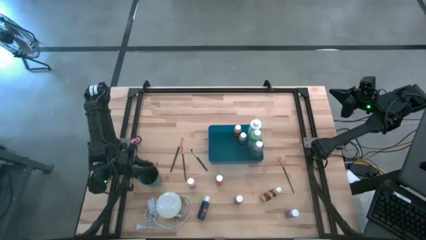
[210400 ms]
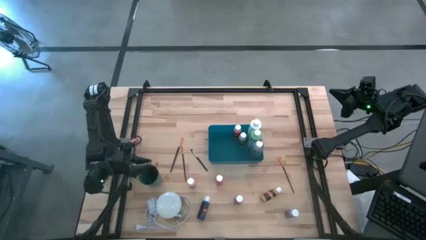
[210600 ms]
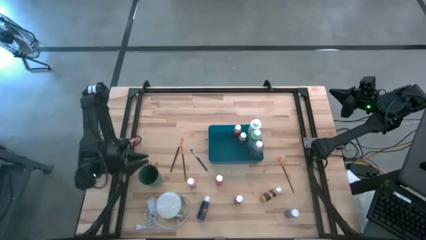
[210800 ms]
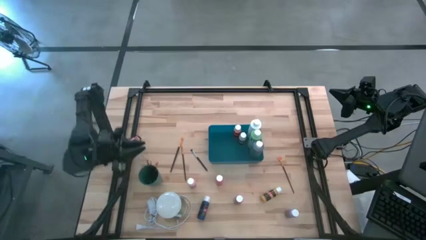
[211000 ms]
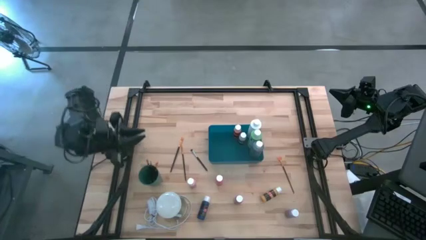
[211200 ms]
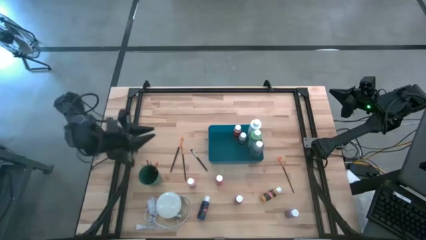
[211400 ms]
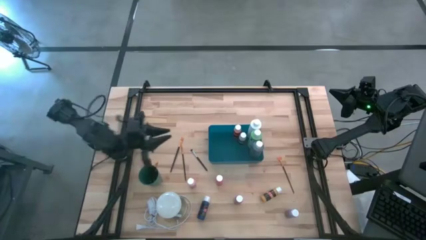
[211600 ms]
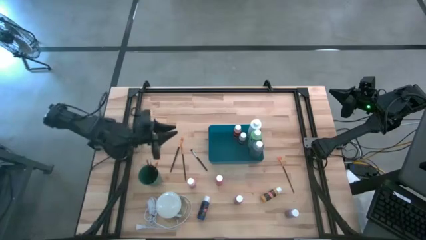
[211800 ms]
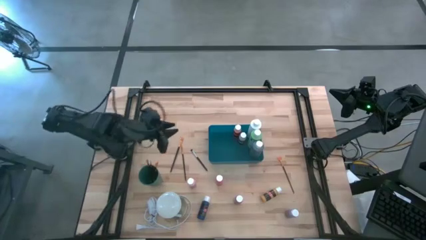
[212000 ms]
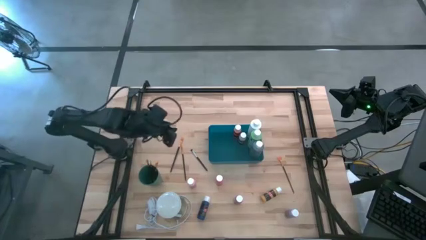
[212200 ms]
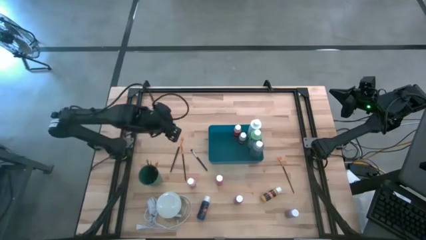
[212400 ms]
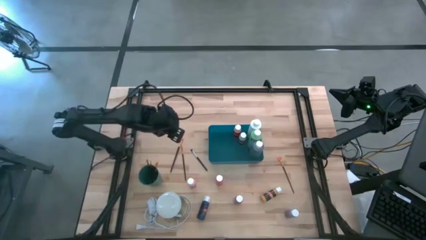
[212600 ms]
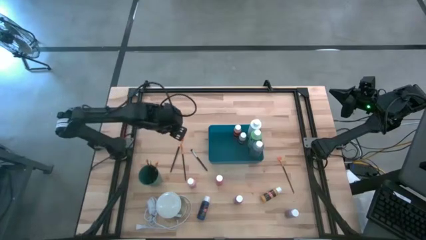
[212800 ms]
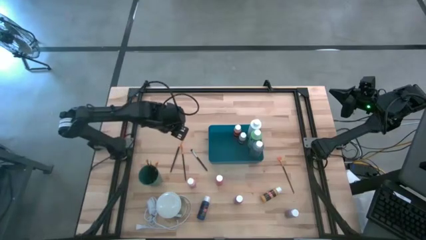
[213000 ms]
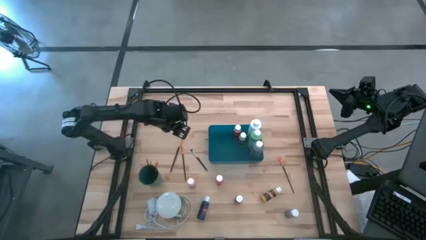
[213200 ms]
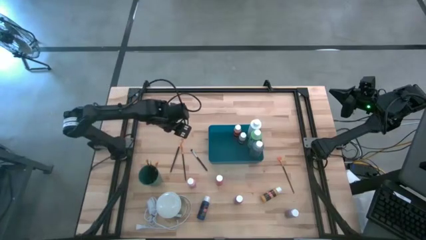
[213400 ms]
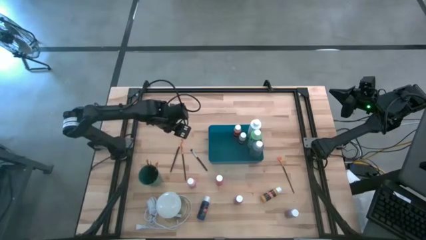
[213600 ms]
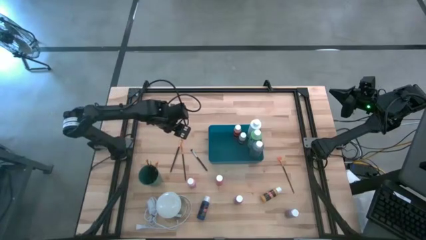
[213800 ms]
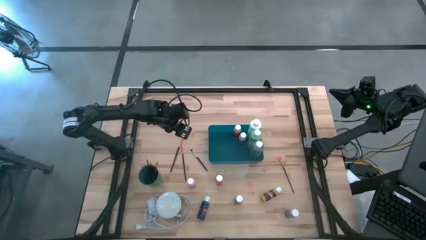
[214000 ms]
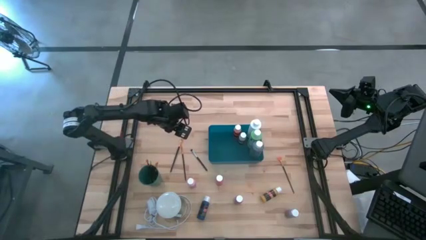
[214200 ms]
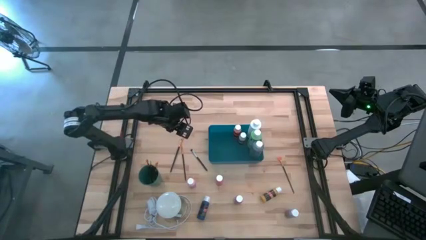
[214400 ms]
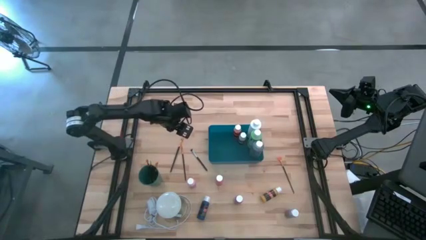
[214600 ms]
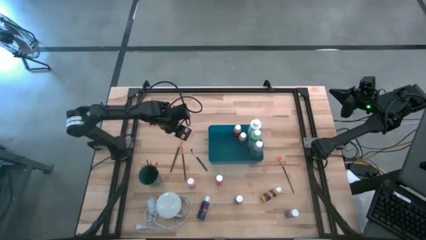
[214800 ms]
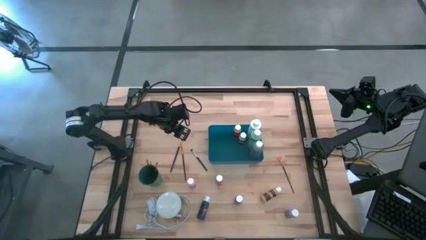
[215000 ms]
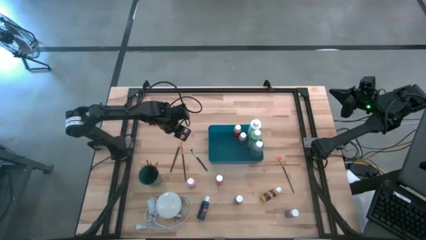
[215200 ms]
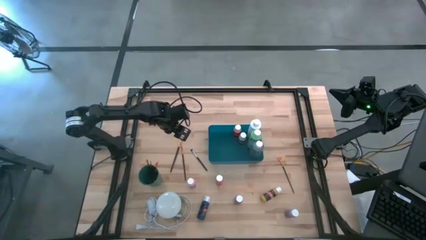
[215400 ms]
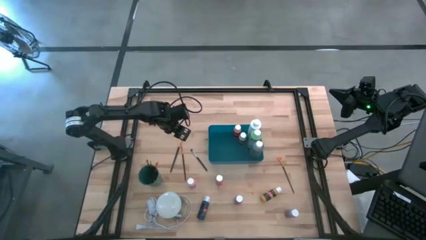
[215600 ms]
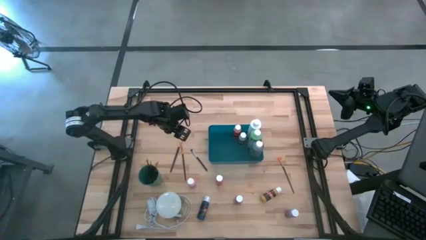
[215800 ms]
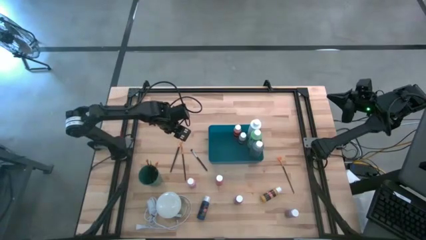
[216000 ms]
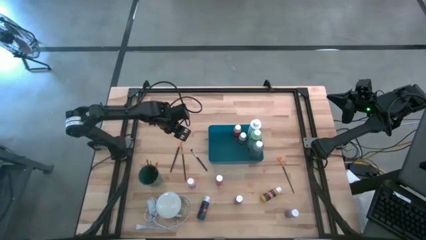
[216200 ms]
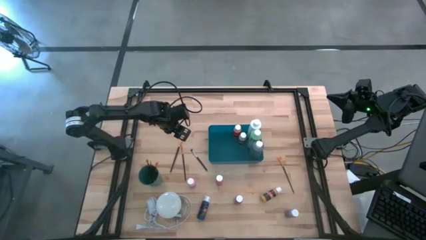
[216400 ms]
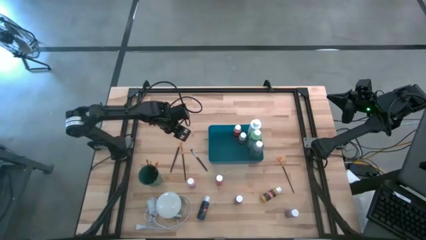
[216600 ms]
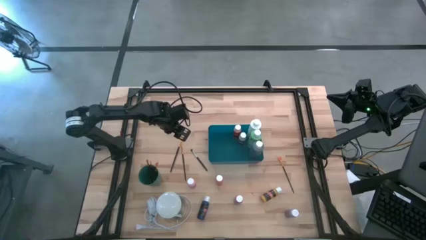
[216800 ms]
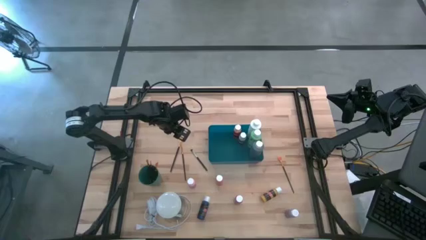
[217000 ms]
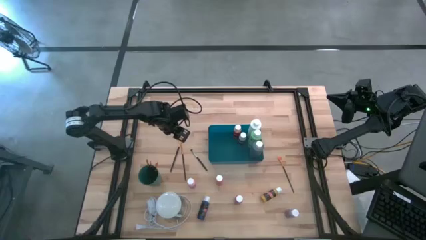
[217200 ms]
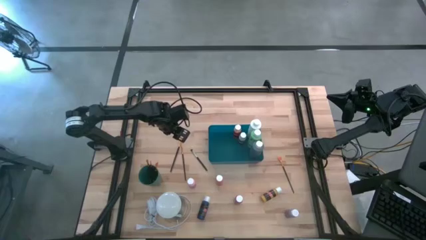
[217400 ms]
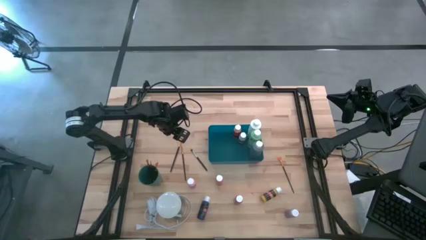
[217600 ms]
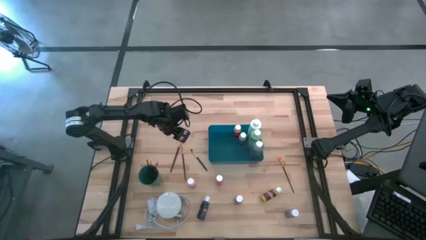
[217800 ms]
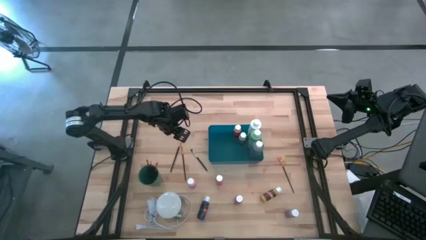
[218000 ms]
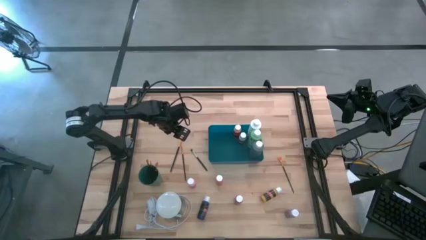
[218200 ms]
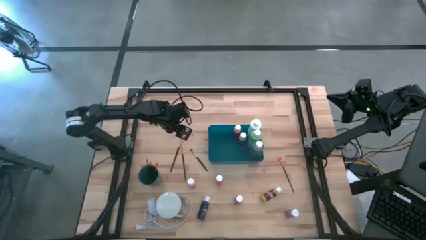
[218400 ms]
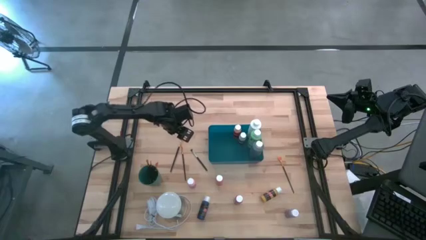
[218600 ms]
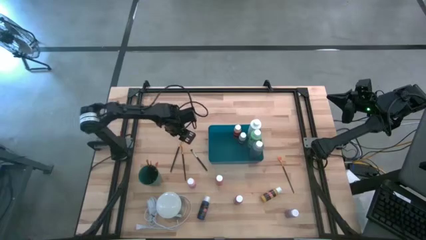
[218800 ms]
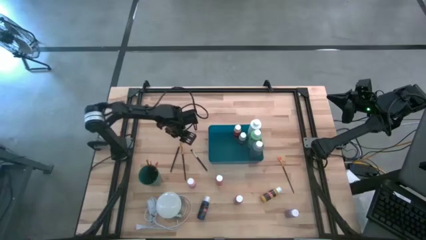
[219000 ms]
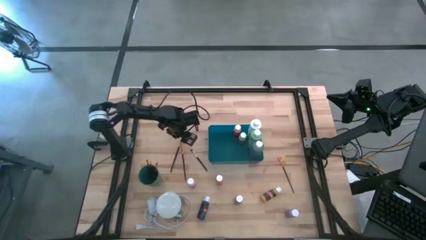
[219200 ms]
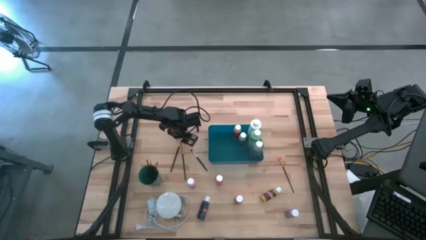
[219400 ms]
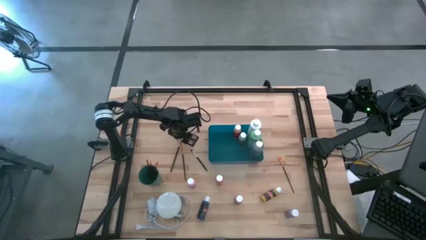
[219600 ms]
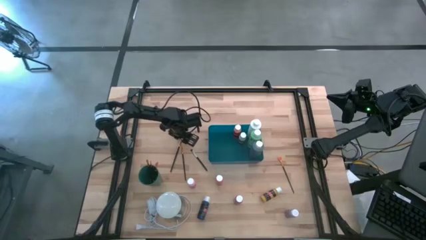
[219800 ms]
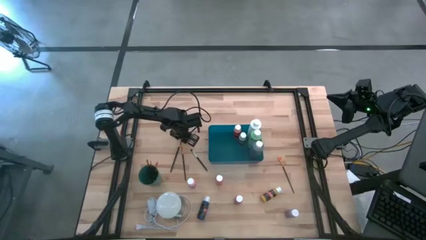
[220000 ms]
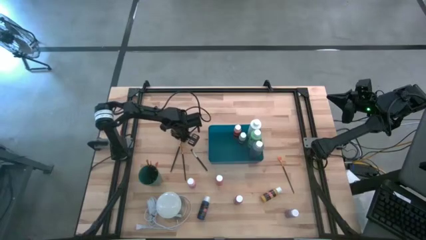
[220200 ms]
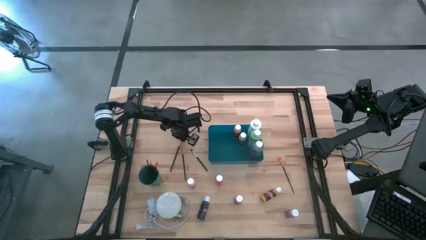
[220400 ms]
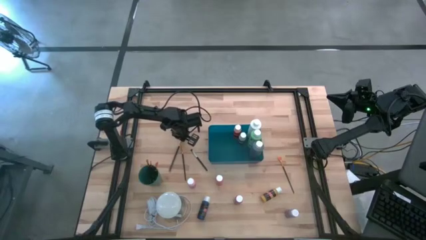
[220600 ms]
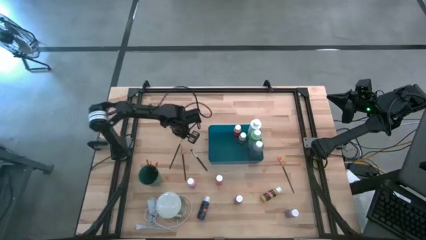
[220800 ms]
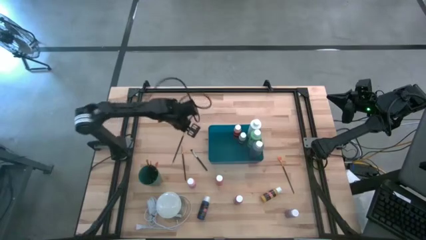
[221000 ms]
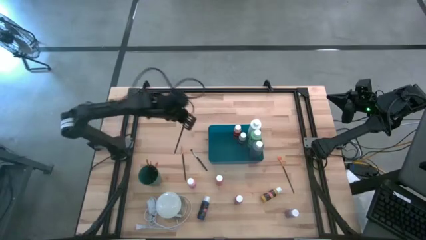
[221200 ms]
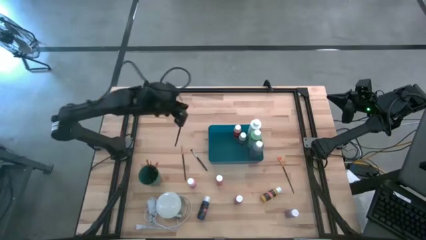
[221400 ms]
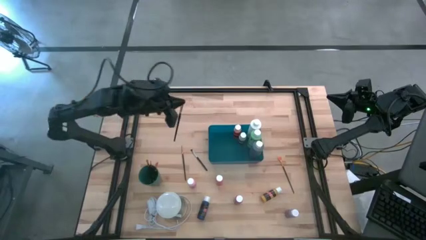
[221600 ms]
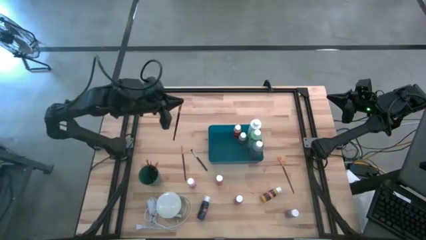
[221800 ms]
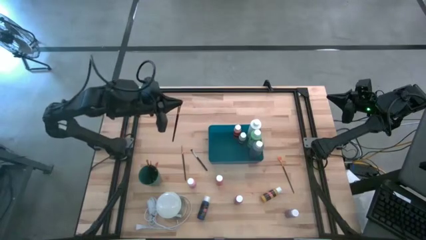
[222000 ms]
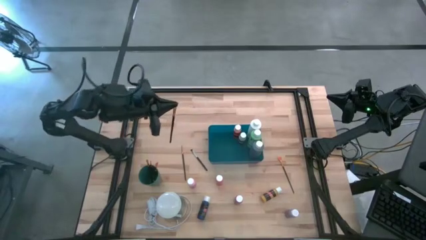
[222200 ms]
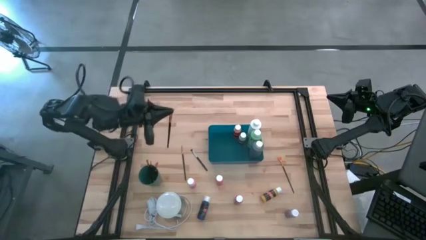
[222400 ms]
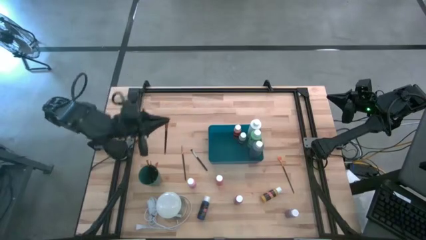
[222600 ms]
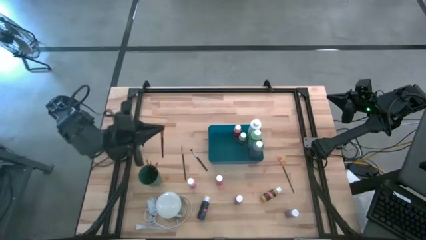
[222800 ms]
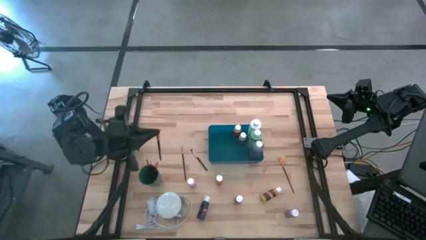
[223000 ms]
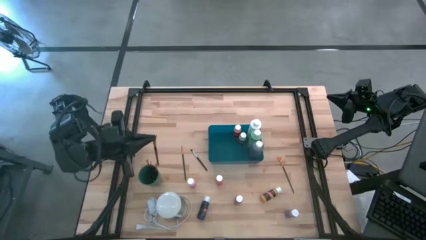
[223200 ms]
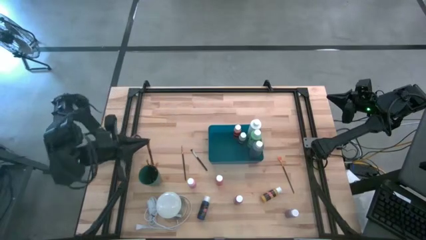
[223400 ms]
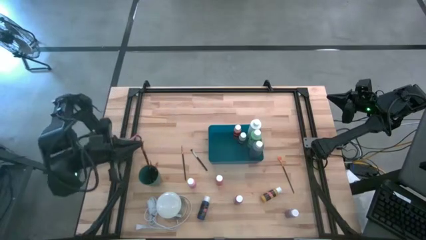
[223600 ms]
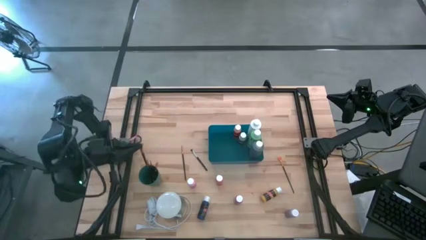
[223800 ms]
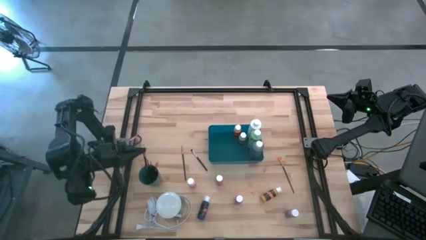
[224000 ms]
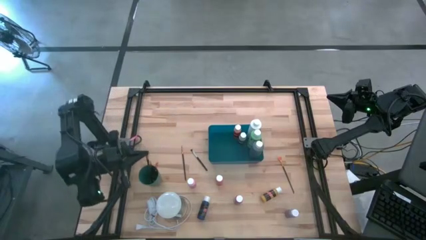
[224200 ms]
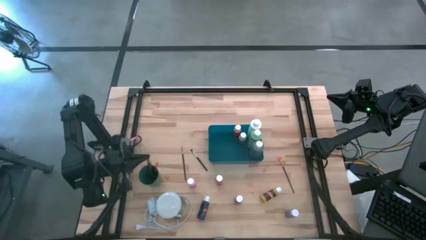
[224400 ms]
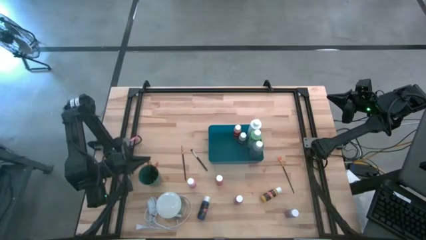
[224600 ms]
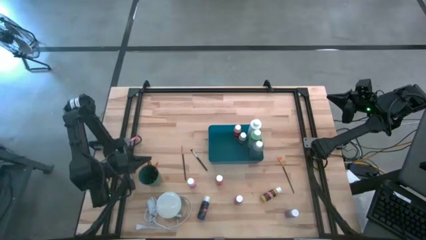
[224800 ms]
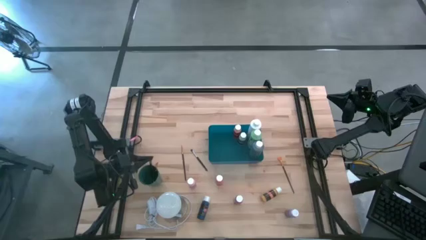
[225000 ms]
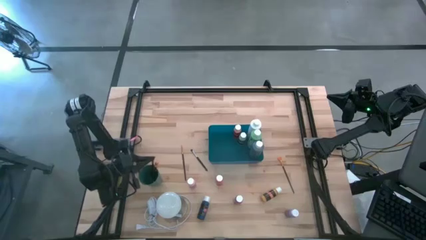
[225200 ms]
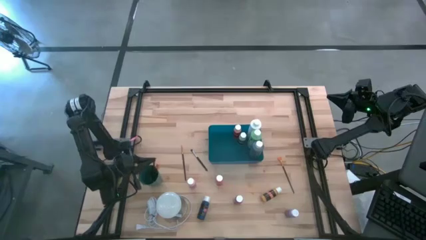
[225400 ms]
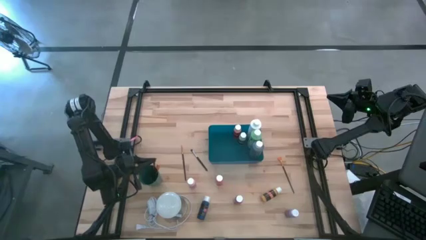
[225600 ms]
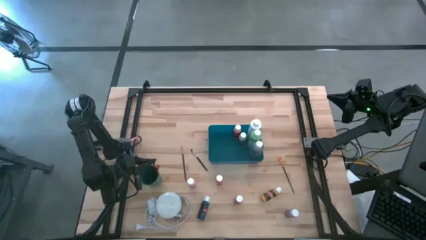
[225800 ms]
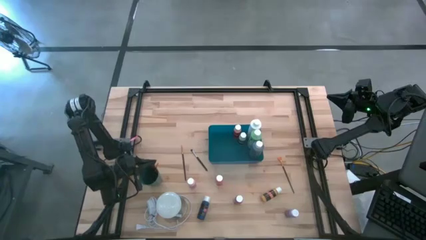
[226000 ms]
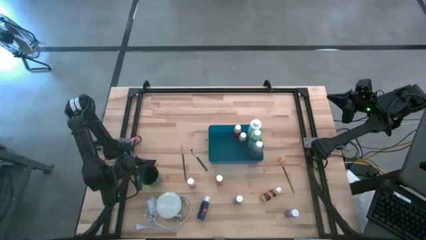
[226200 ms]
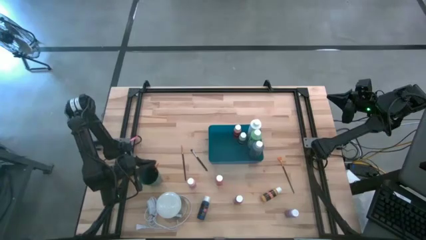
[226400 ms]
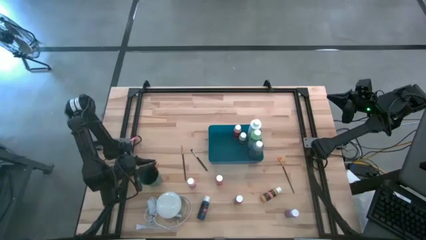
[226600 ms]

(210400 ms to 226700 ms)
Task: Pick & Place Paint Supplies
Put the gold paintbrush into the green cup

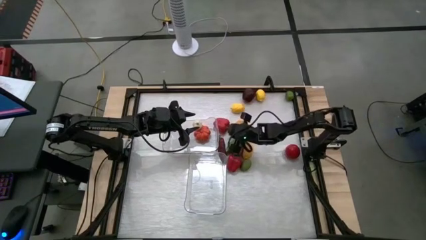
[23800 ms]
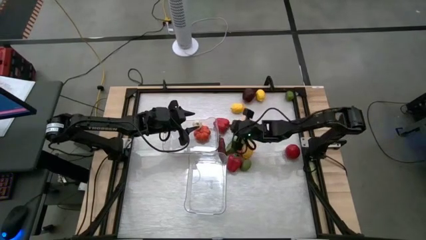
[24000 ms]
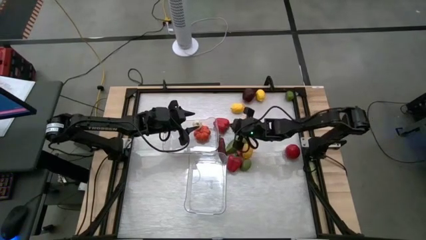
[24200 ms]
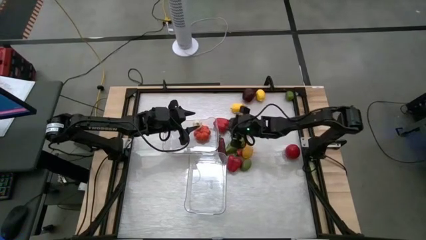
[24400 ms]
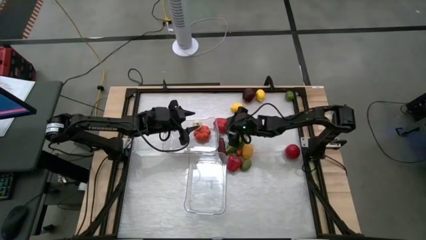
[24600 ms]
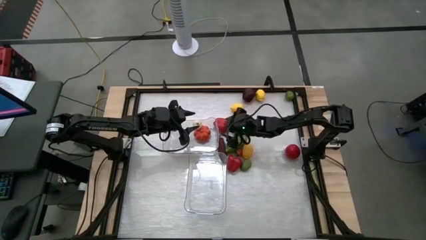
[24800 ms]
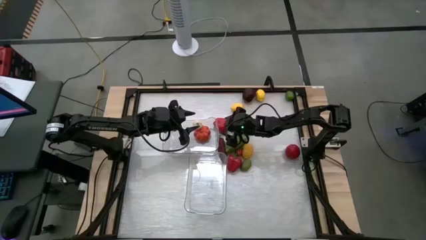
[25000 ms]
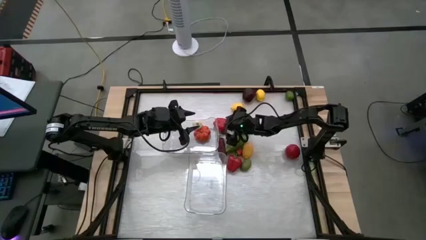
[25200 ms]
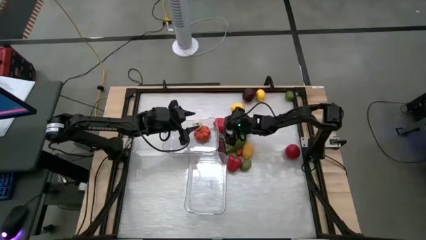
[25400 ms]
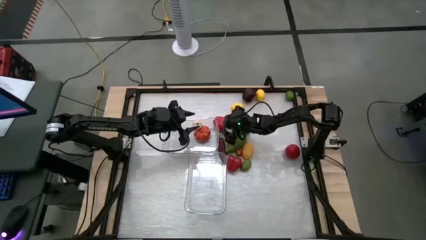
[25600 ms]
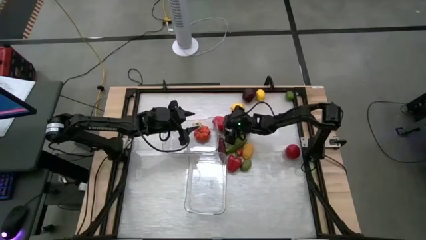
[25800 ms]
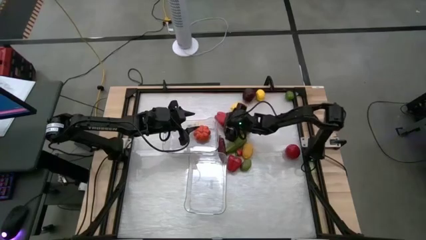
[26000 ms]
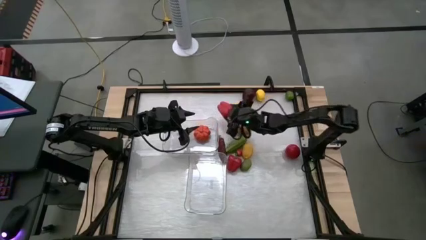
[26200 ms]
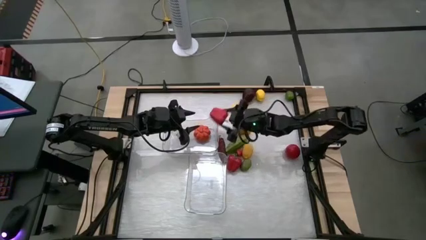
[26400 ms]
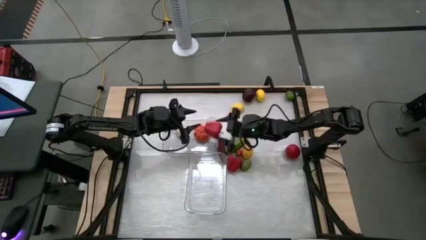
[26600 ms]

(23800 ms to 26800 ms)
Task: Sort produce into baskets
Put the top red bell pepper into the top transparent bin
